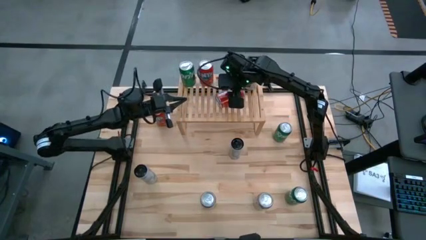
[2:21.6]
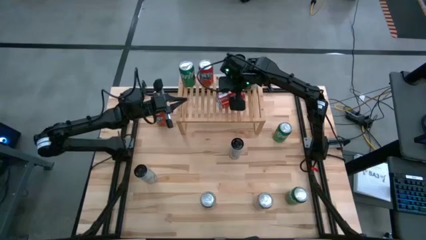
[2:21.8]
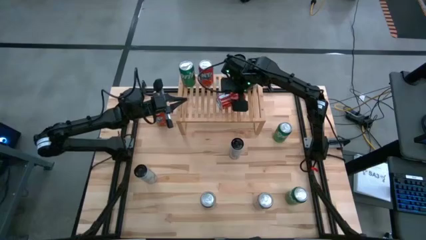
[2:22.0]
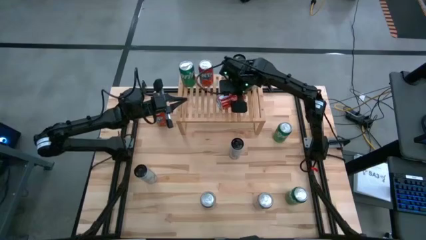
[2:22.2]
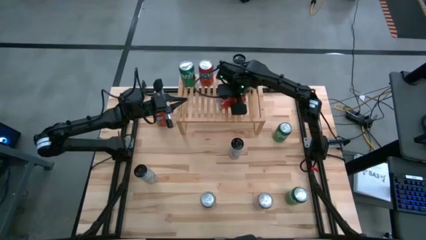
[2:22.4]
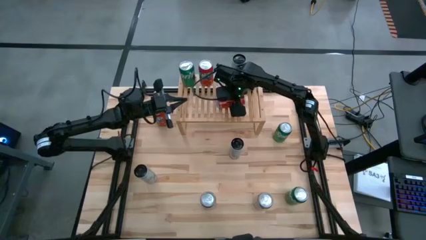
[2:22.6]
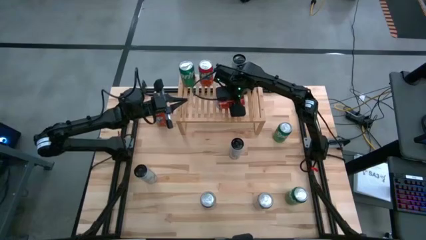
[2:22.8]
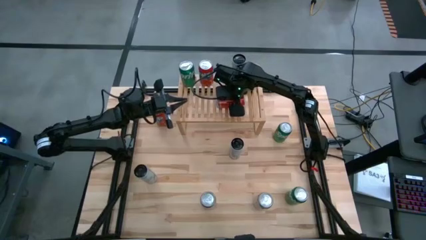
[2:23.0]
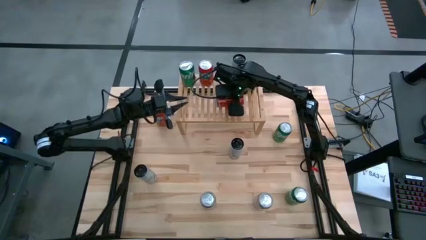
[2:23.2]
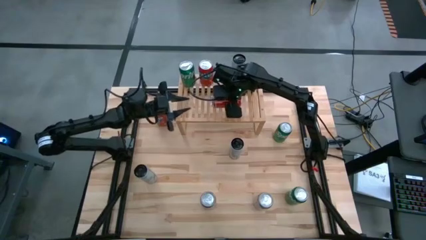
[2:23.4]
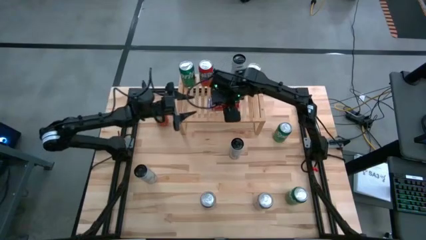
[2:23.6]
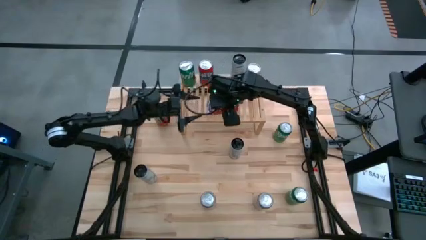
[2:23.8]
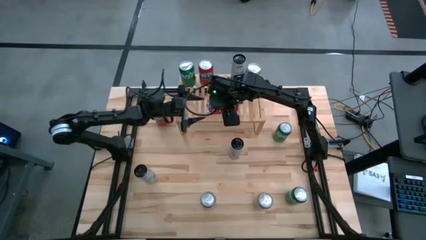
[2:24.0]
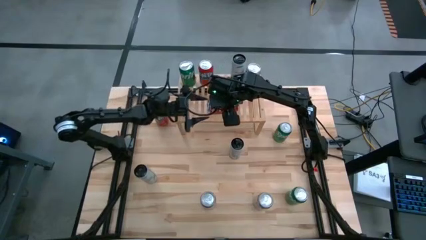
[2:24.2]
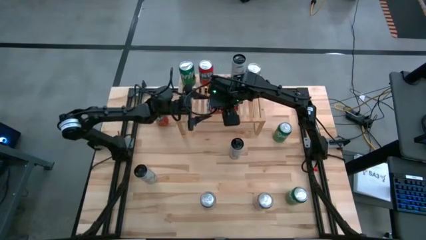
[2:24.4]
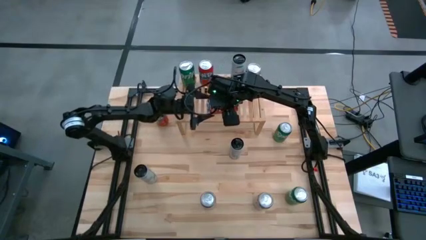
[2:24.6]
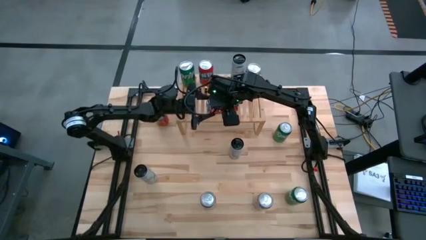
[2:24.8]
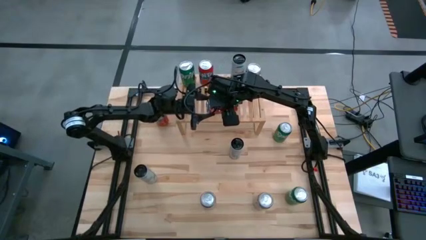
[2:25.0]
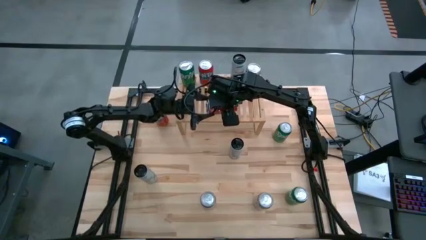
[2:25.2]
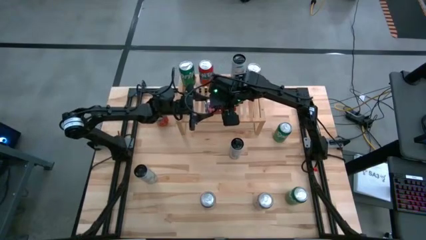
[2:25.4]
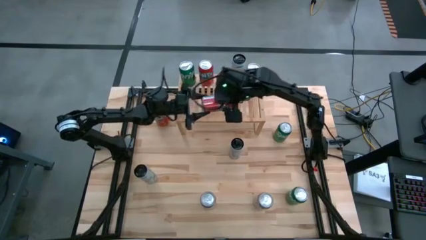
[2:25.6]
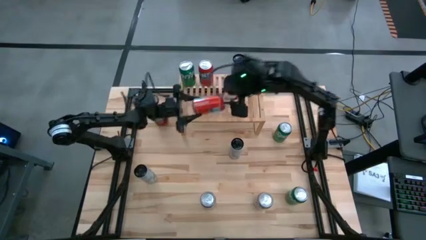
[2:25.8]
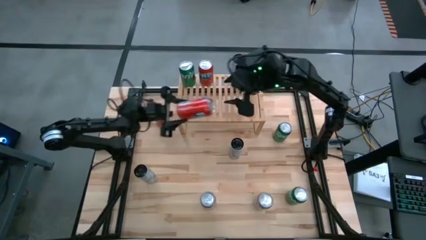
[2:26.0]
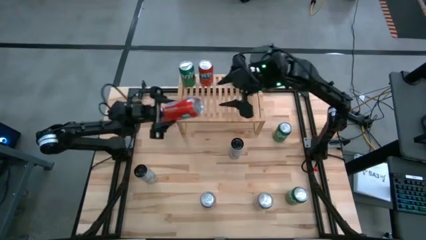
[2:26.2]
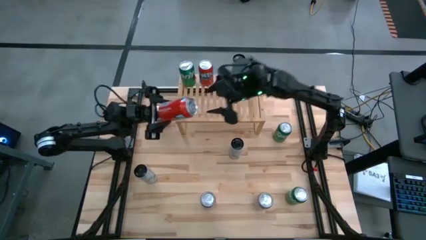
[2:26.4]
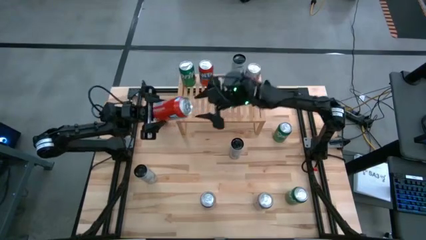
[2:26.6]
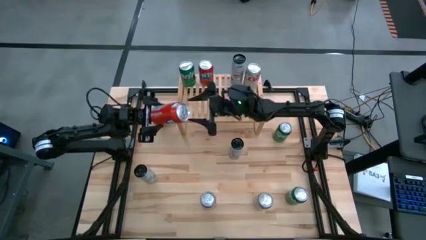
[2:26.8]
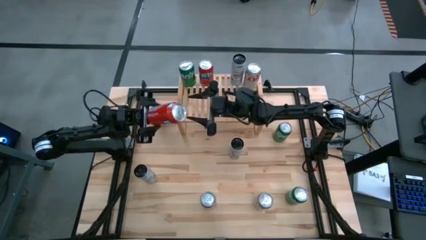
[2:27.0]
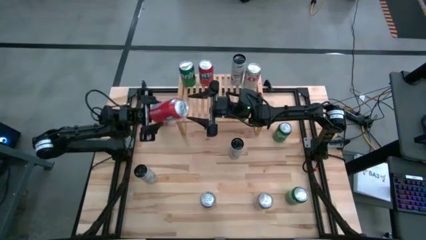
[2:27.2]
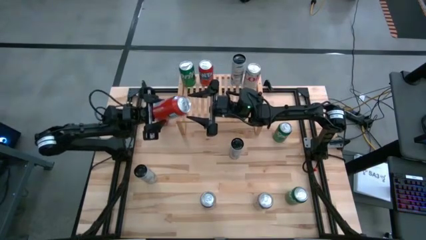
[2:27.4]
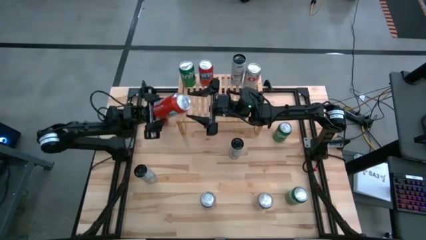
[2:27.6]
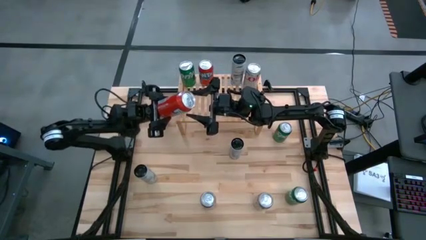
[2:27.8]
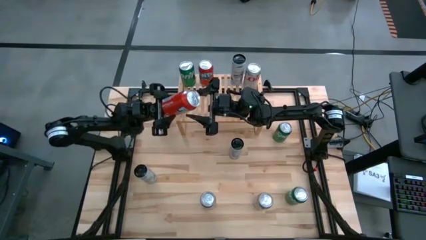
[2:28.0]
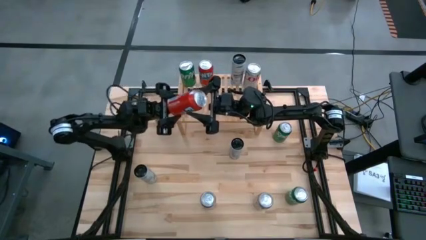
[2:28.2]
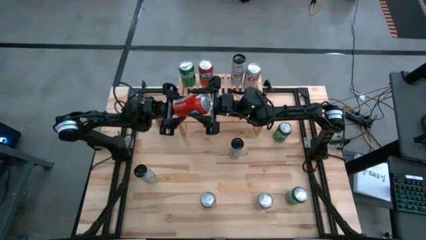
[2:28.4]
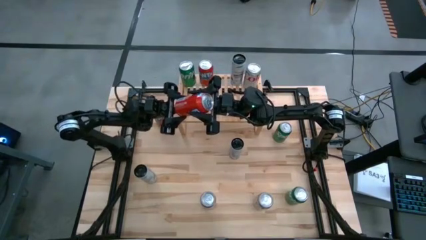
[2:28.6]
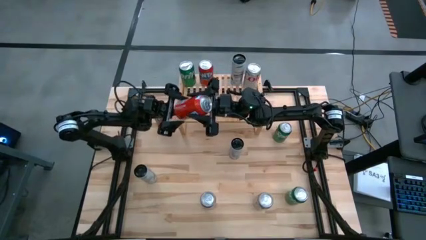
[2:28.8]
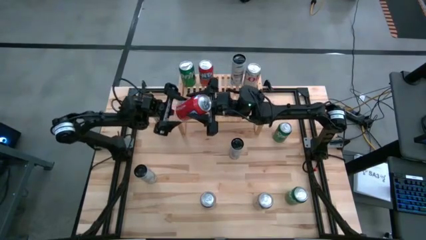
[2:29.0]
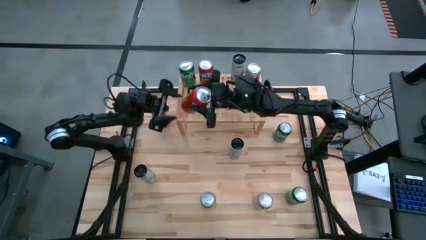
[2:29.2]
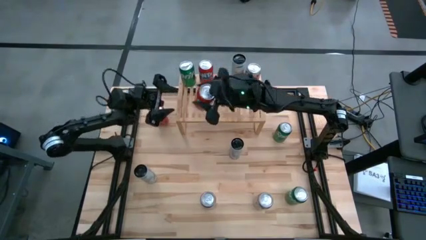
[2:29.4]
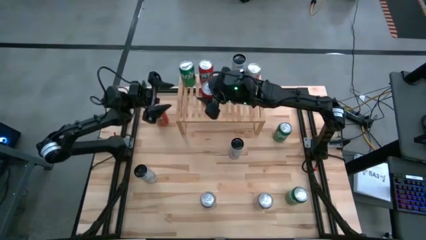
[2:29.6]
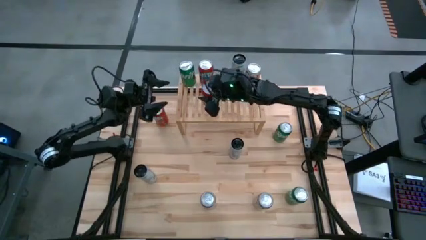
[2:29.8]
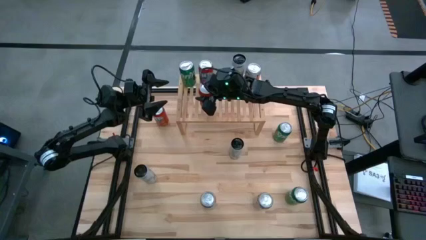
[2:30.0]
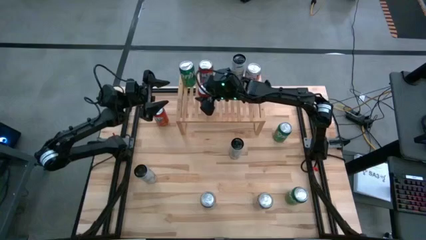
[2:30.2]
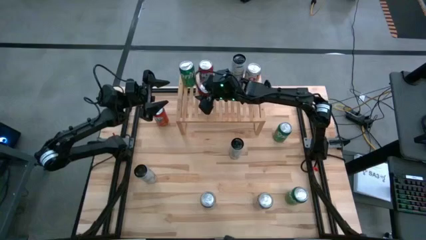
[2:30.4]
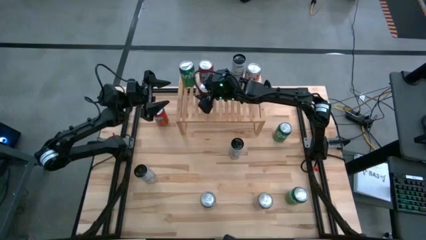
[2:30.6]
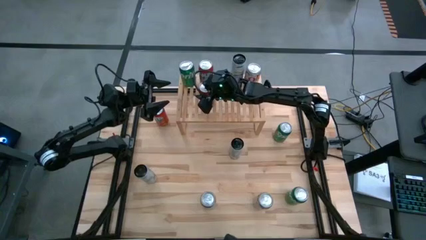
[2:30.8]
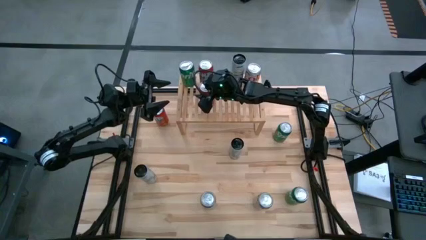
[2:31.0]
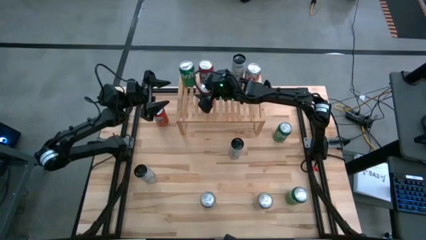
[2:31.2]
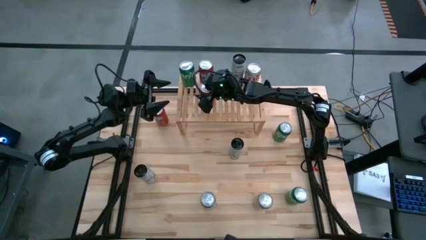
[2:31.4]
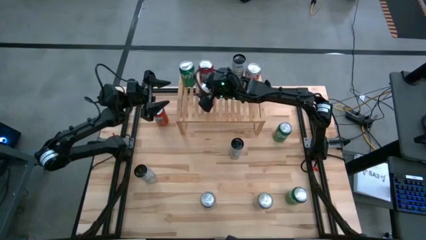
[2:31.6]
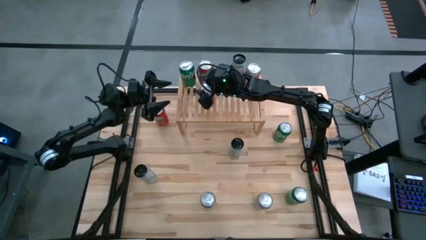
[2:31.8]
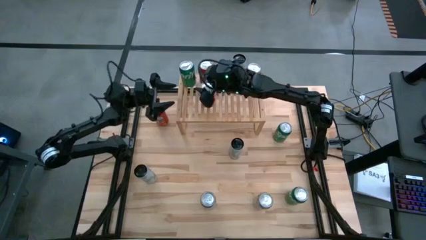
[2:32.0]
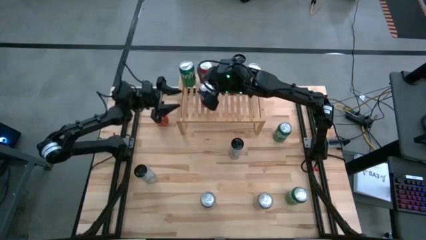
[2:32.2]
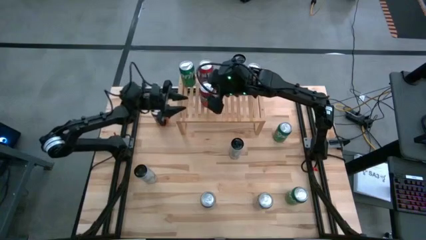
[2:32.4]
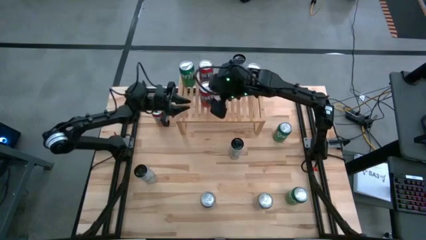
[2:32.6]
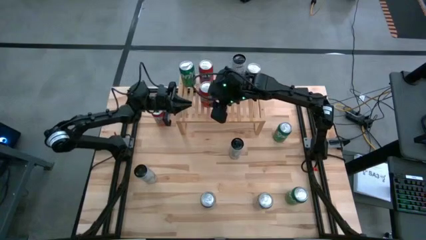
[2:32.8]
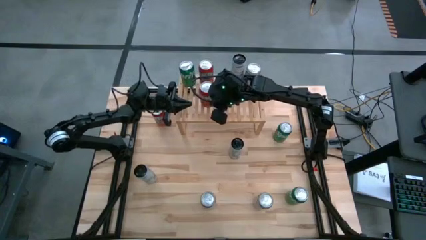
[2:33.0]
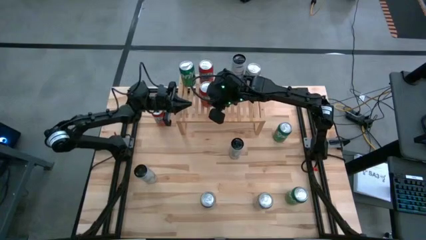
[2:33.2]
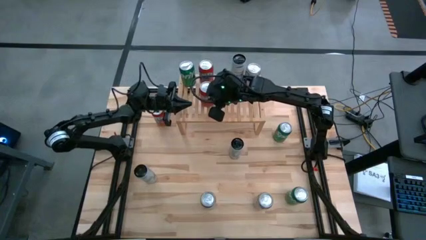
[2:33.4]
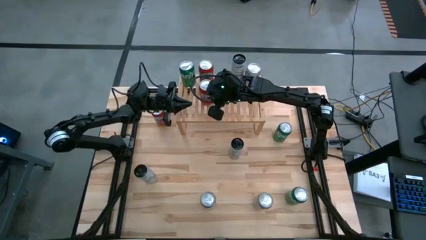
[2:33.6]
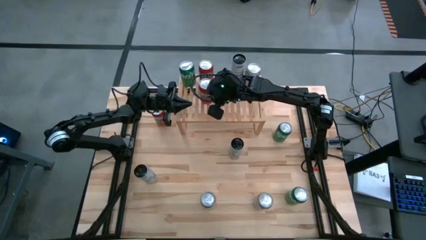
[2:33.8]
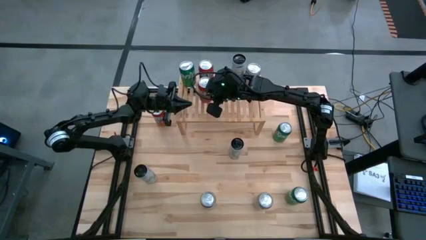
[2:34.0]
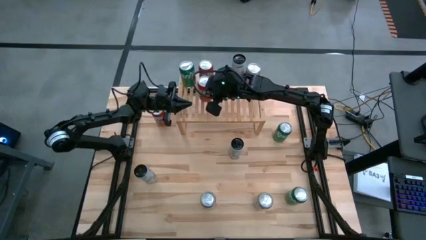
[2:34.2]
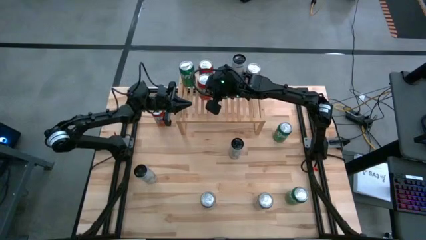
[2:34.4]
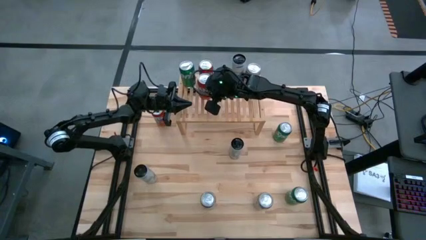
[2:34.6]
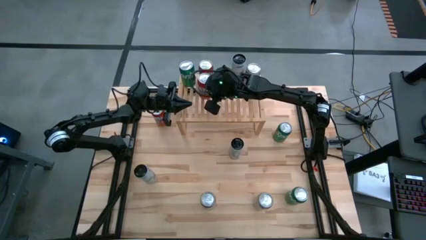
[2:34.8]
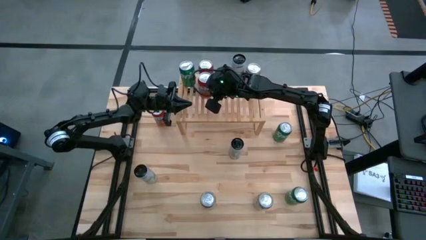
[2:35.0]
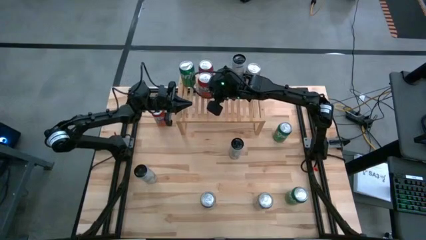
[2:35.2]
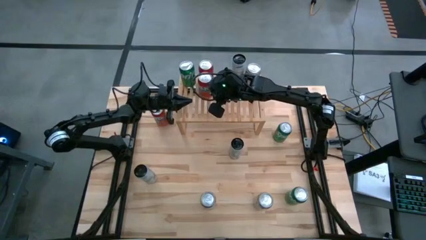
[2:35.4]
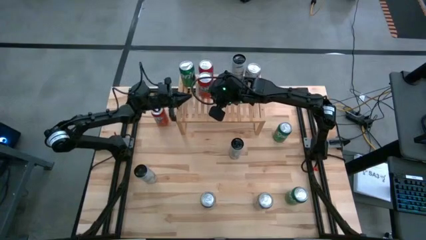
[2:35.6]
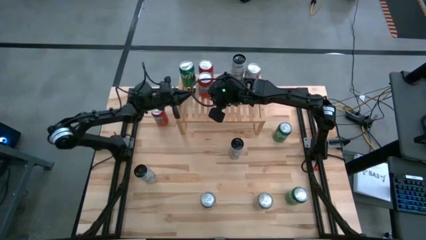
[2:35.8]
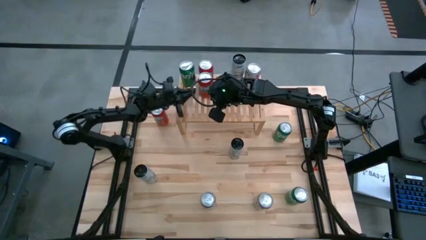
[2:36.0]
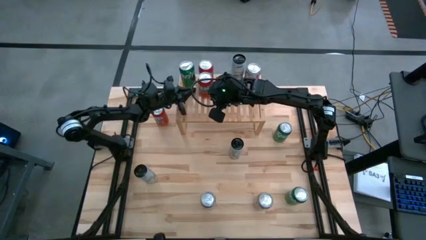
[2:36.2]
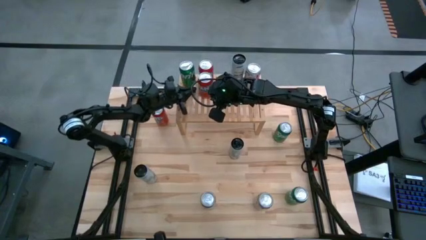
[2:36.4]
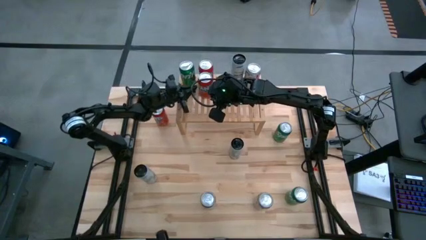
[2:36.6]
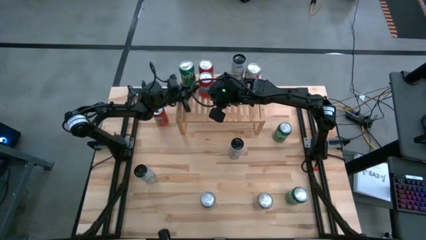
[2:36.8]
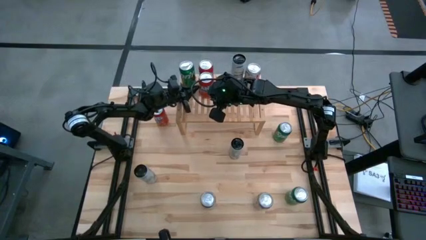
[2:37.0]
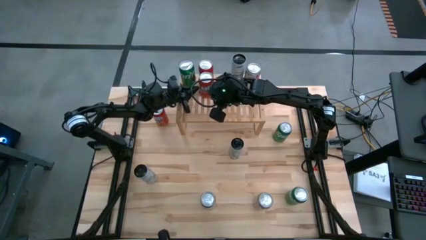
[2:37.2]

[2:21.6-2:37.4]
Task: Place canned beverage on shelf
Put the bottom red soda can aligned with the other red soda can on the shelf
